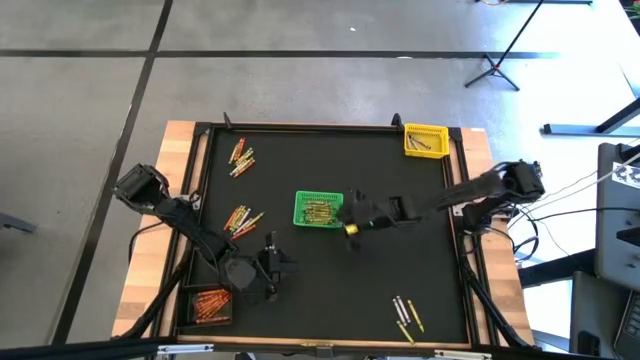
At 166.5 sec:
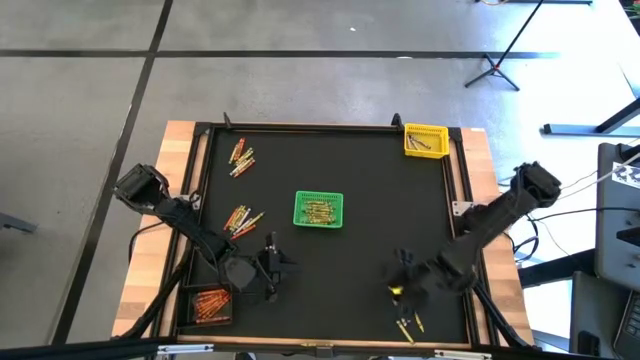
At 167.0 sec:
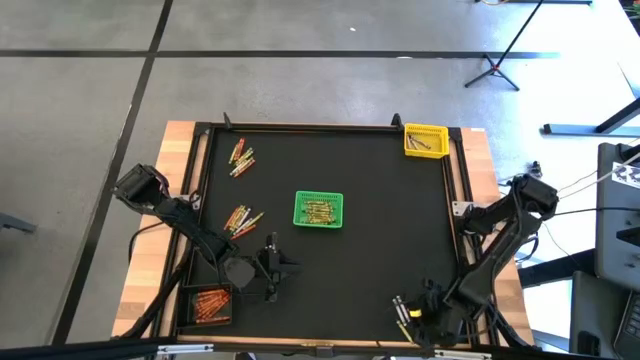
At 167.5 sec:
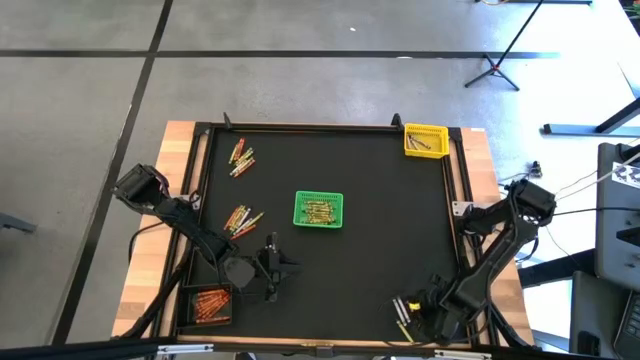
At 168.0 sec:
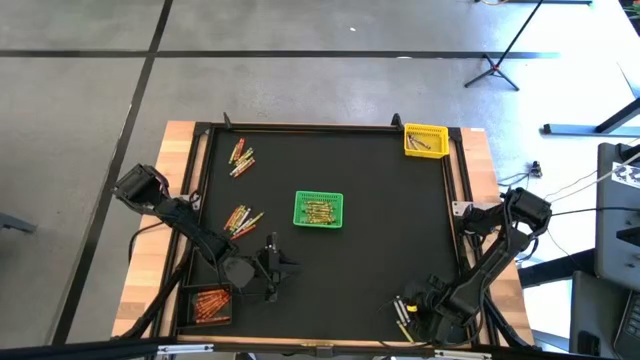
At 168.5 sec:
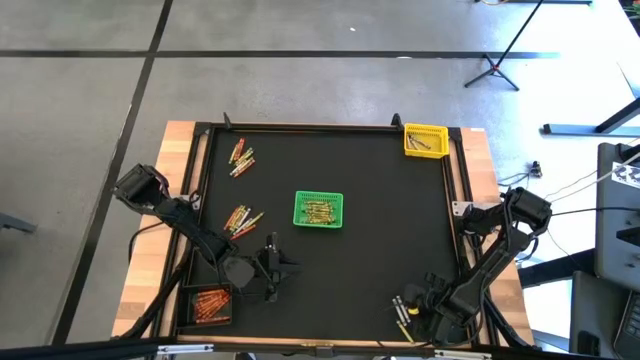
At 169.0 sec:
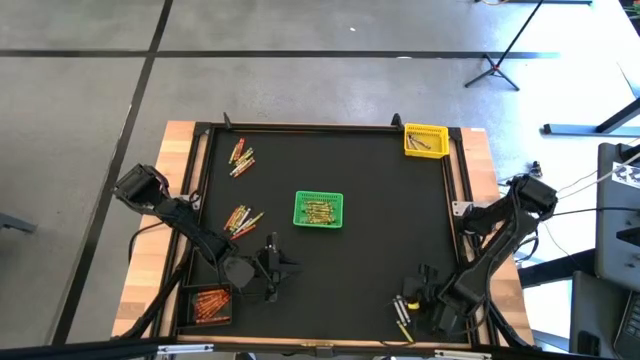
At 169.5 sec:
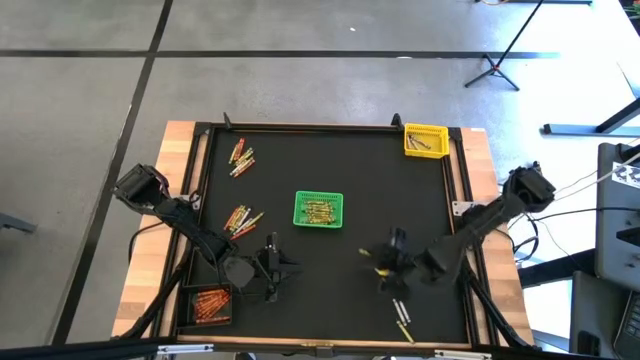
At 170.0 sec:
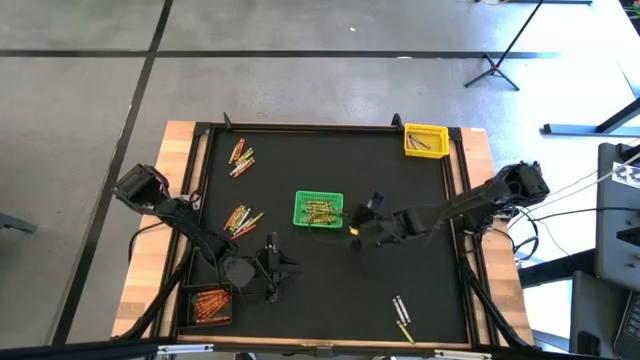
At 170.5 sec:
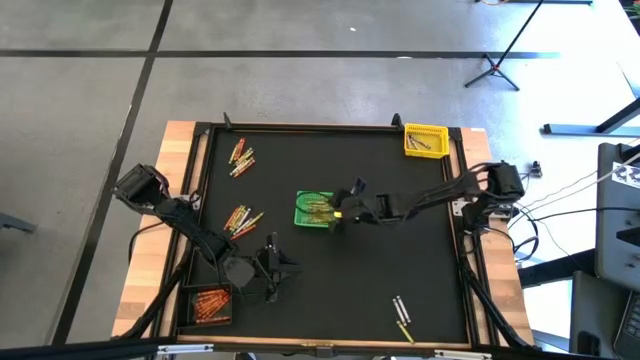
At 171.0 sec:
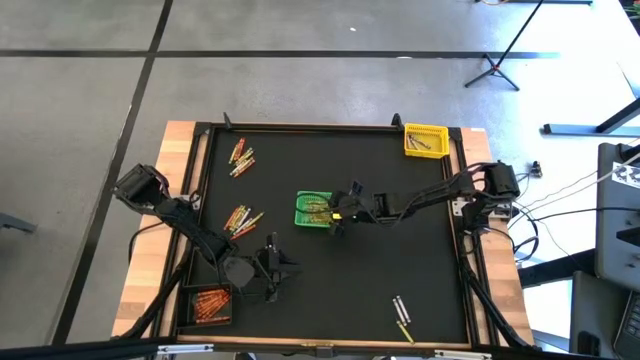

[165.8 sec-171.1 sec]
Task: Sort crayons
Put the green crayon into the green bin

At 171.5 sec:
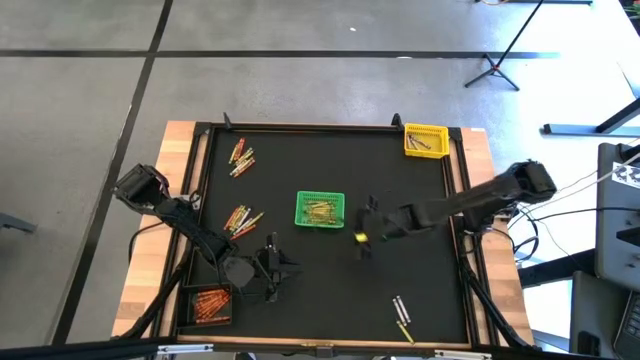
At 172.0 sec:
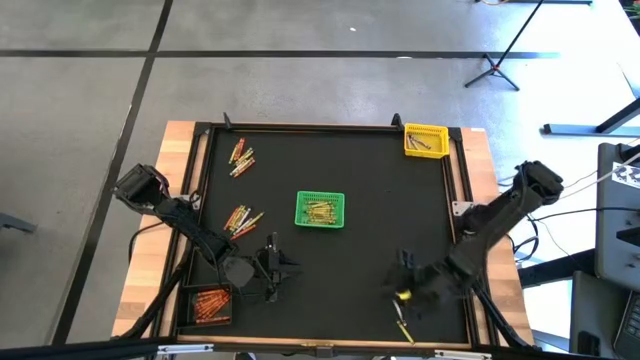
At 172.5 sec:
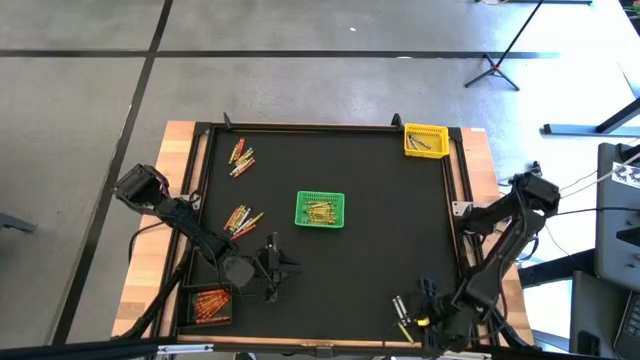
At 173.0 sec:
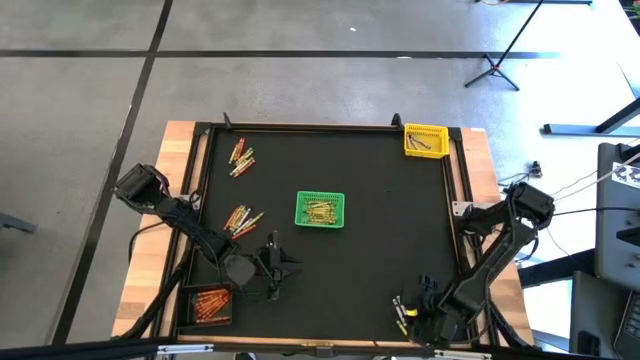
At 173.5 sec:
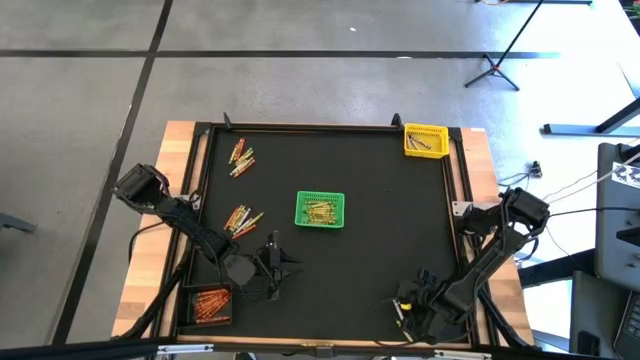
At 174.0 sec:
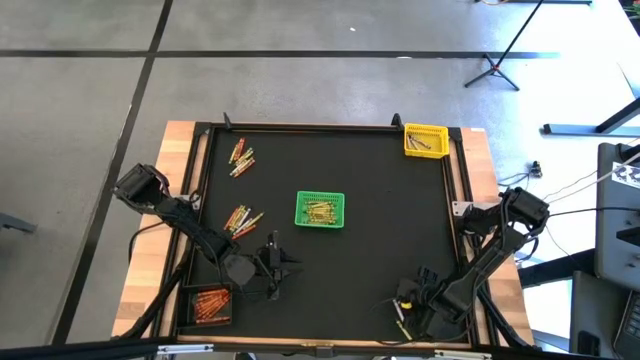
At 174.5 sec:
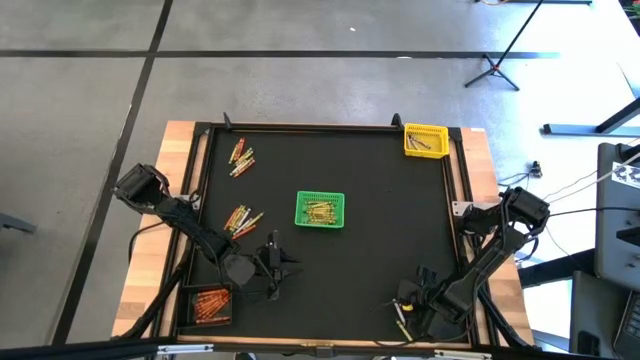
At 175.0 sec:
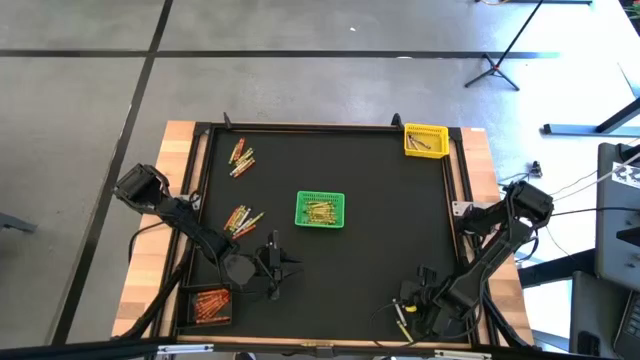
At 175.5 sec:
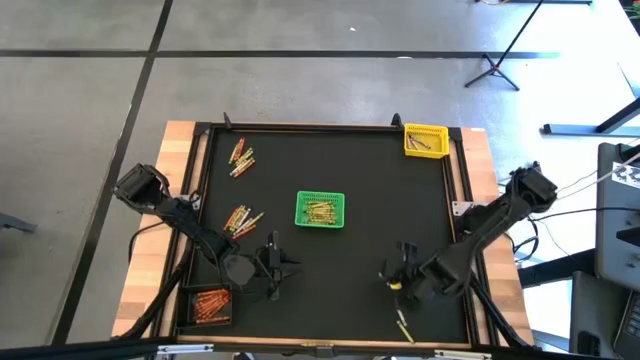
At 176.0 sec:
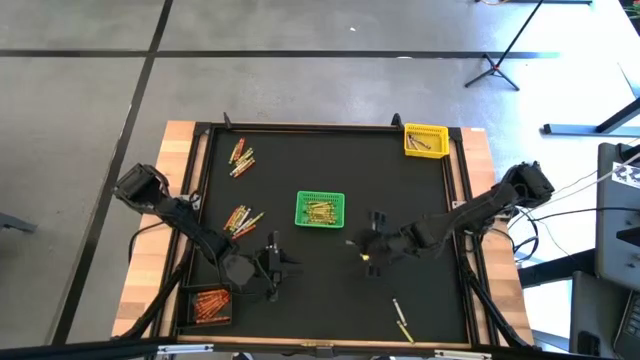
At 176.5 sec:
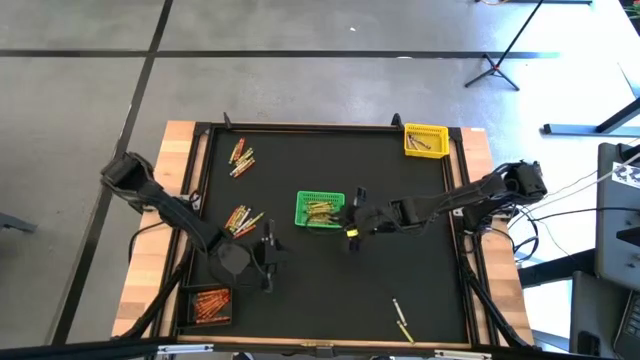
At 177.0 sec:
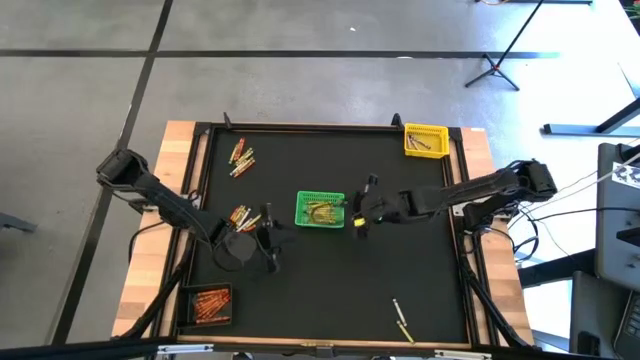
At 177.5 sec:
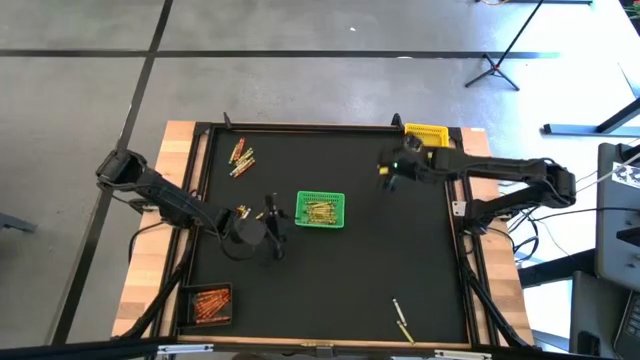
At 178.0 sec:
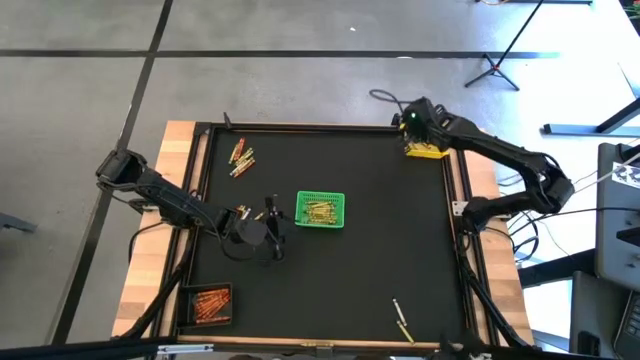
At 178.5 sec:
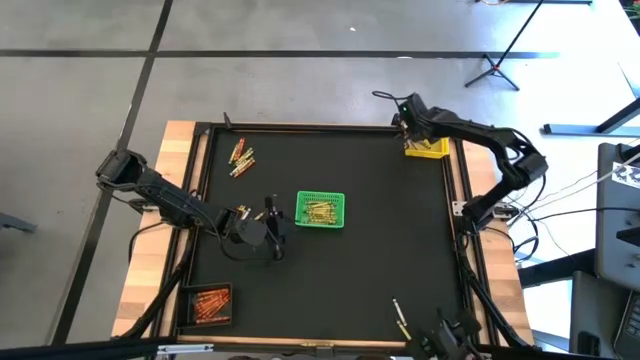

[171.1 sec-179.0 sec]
Put the black crayon into the yellow bin

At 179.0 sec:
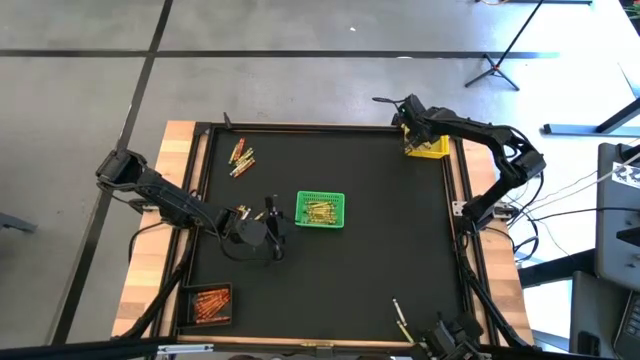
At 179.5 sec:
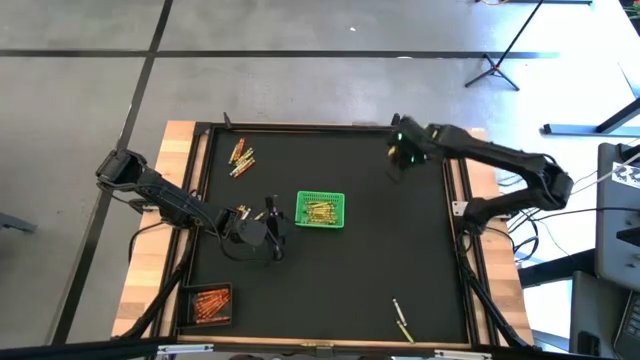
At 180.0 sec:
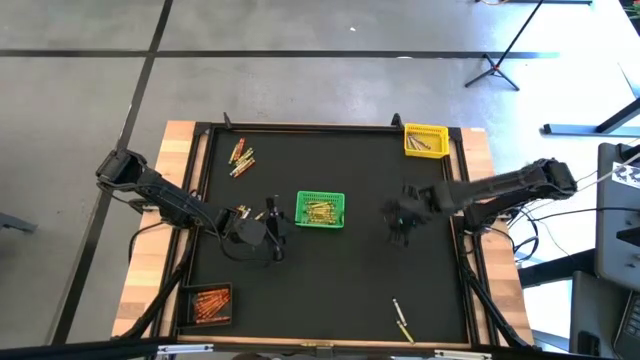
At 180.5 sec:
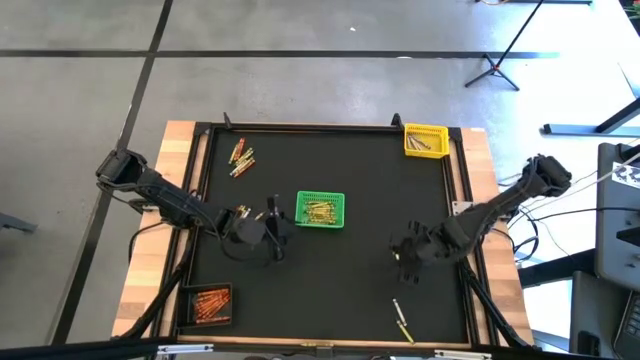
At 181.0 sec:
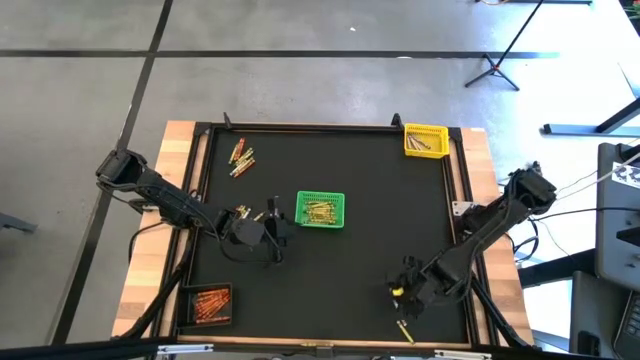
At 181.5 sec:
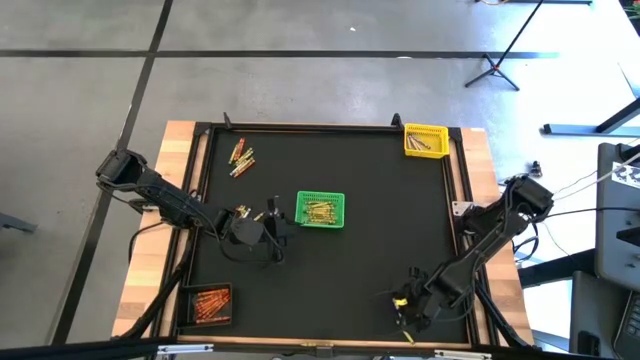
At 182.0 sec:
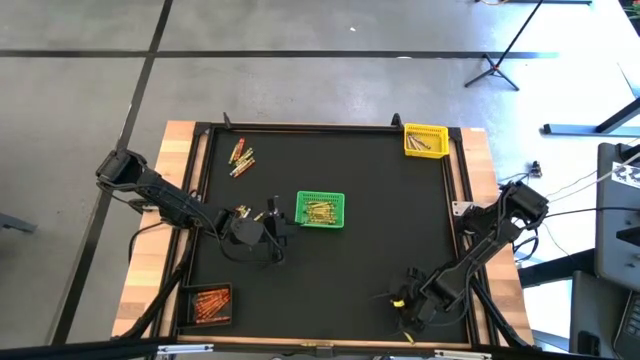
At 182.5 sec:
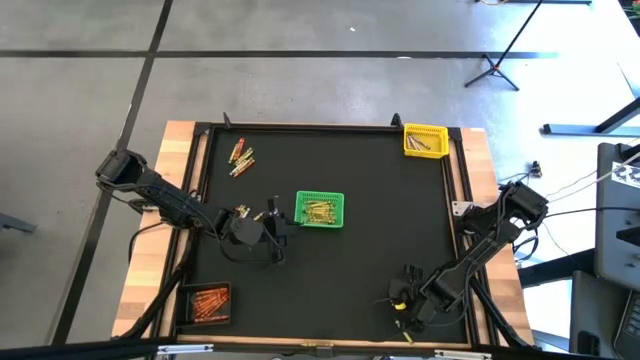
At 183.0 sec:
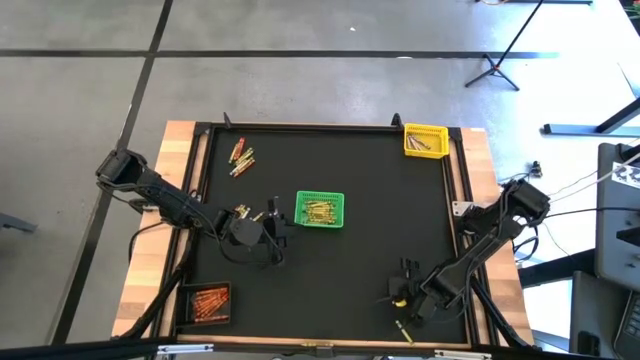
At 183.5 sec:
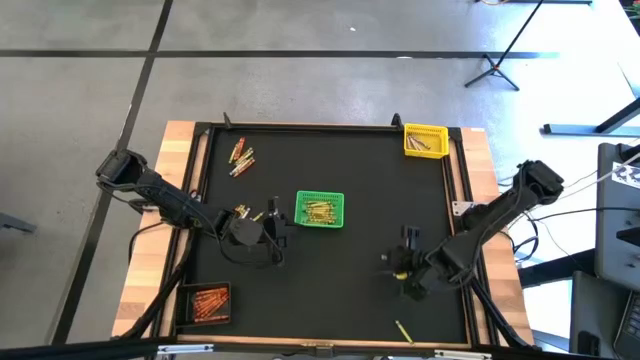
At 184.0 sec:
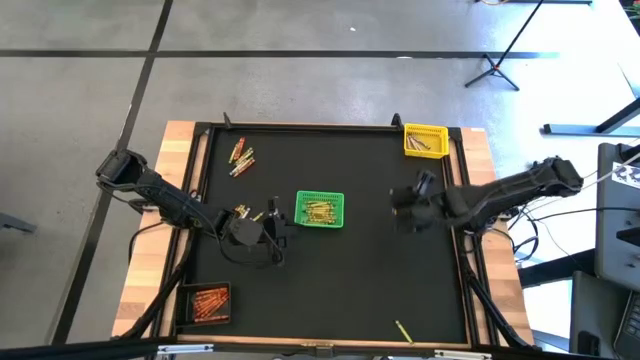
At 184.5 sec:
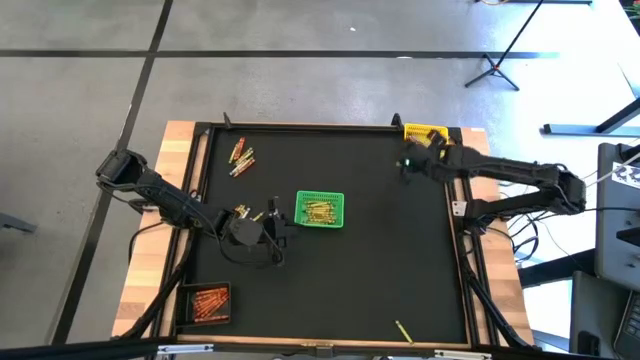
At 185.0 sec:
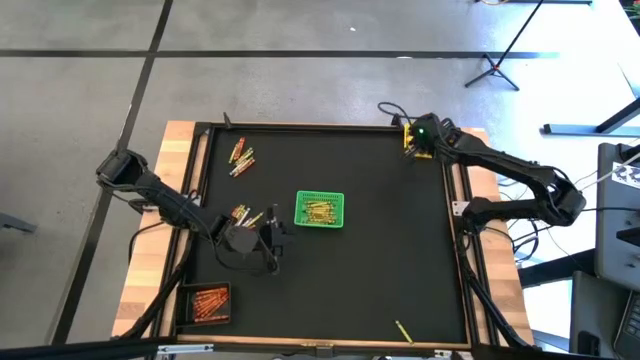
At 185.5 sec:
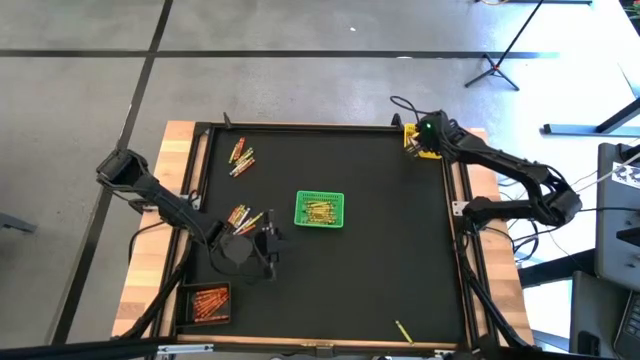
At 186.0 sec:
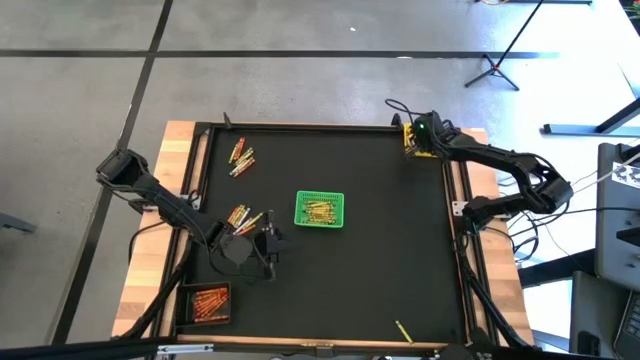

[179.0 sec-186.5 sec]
Put the black crayon into the yellow bin
